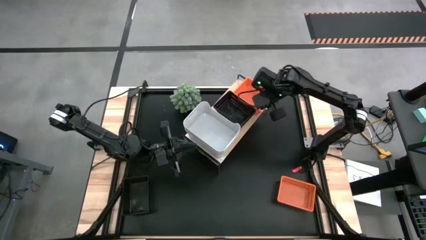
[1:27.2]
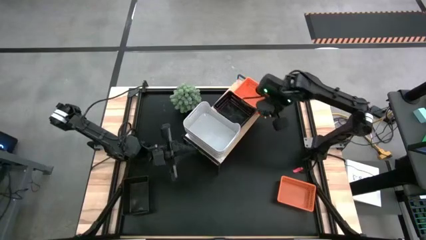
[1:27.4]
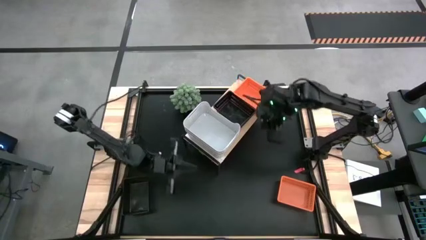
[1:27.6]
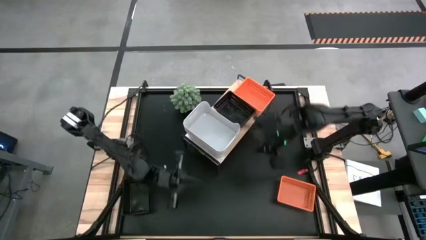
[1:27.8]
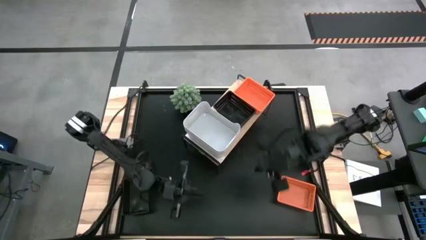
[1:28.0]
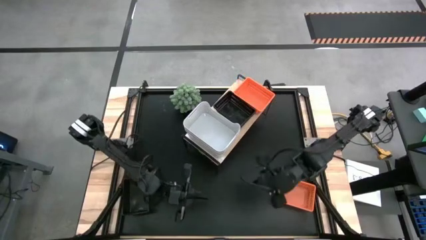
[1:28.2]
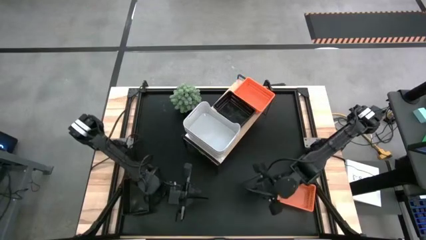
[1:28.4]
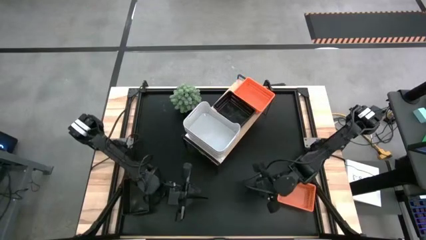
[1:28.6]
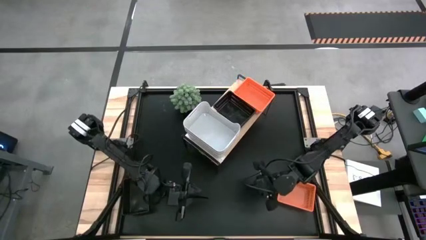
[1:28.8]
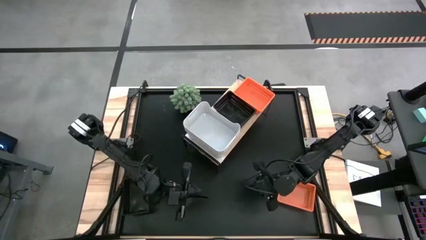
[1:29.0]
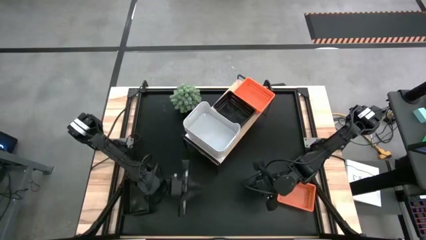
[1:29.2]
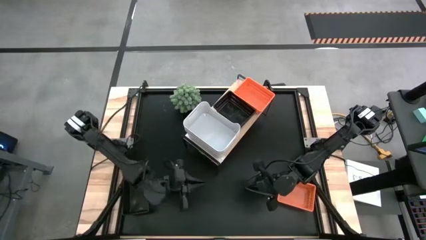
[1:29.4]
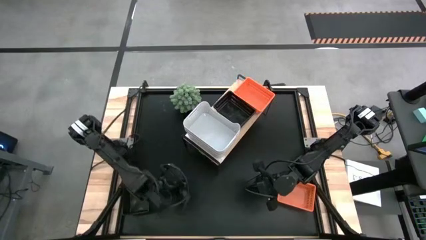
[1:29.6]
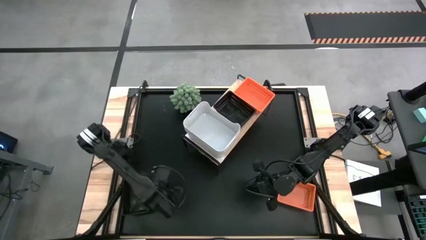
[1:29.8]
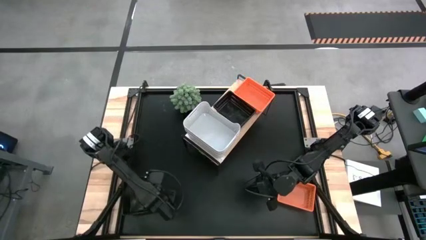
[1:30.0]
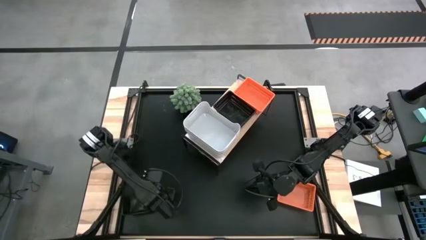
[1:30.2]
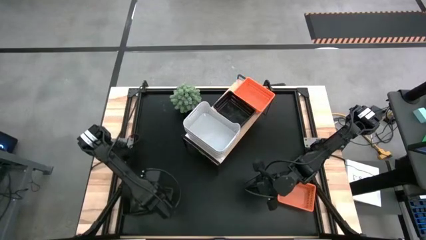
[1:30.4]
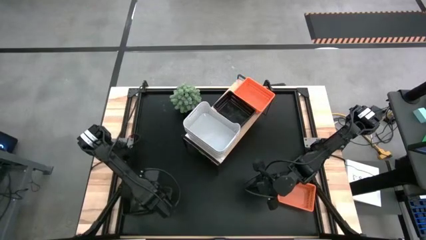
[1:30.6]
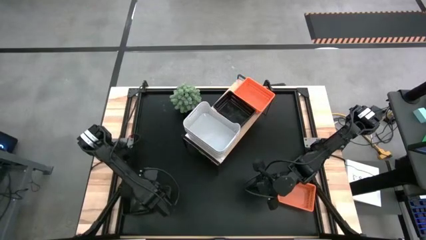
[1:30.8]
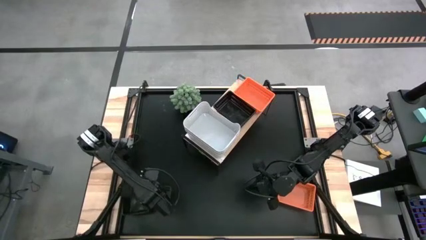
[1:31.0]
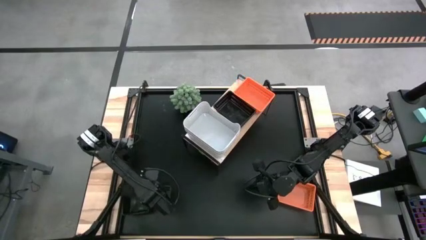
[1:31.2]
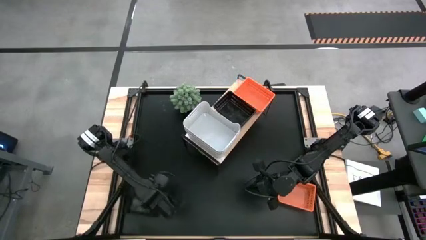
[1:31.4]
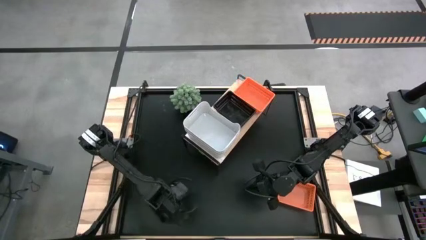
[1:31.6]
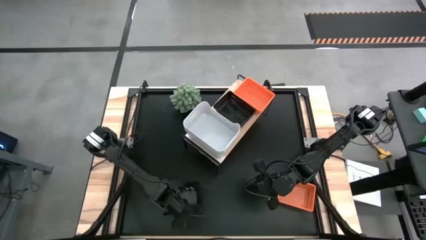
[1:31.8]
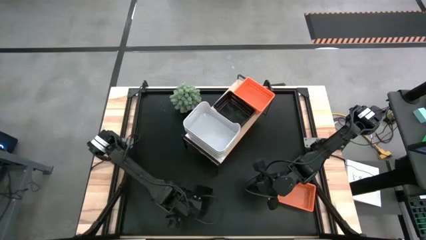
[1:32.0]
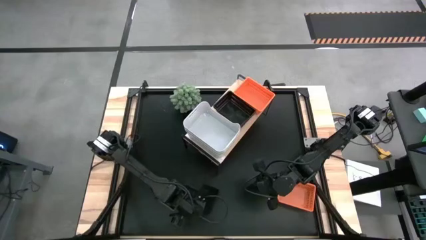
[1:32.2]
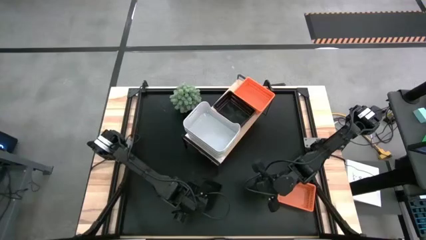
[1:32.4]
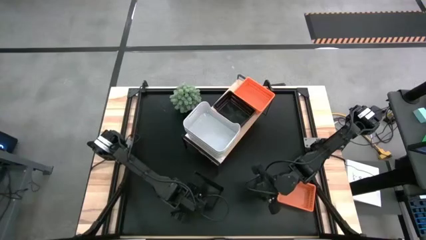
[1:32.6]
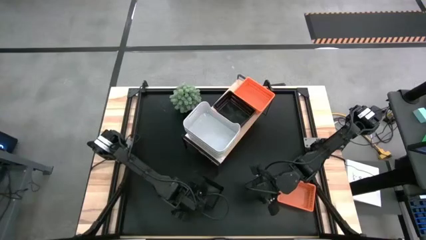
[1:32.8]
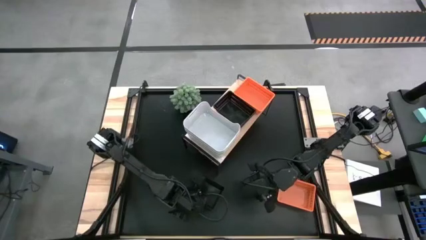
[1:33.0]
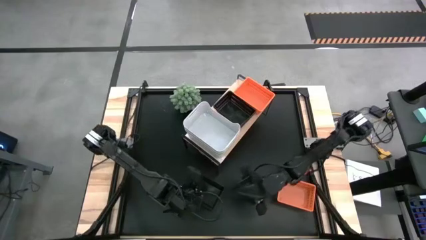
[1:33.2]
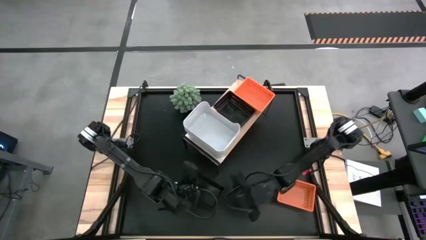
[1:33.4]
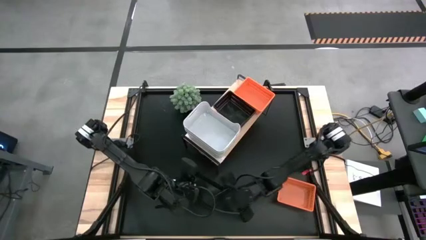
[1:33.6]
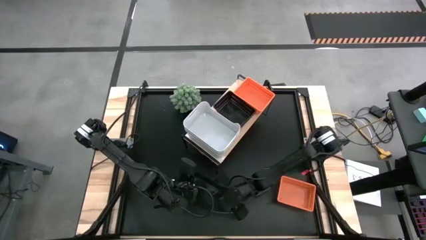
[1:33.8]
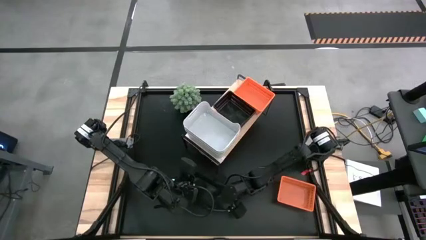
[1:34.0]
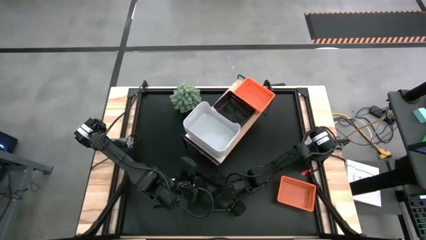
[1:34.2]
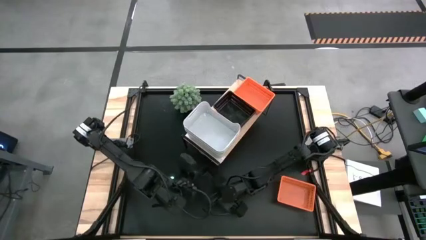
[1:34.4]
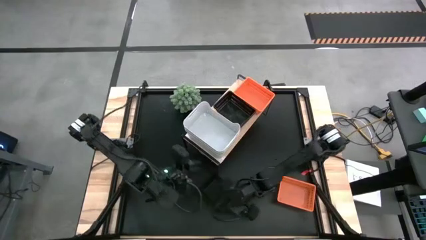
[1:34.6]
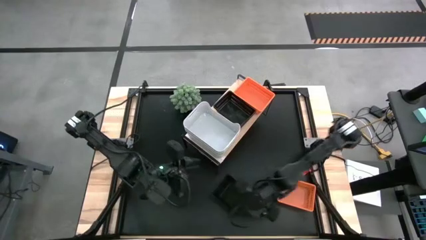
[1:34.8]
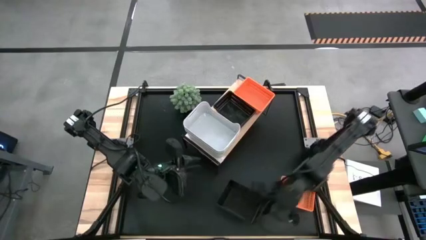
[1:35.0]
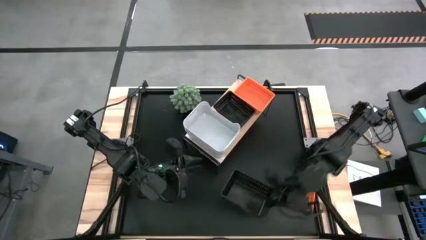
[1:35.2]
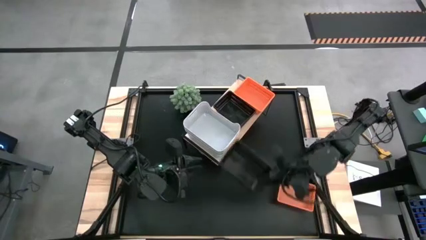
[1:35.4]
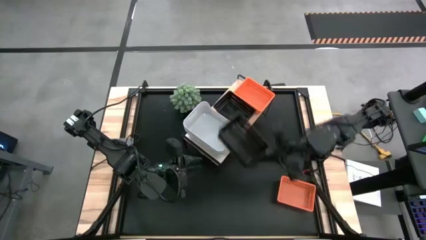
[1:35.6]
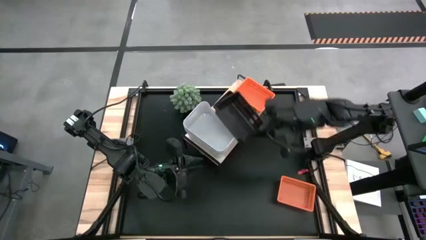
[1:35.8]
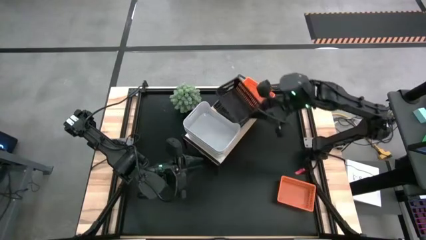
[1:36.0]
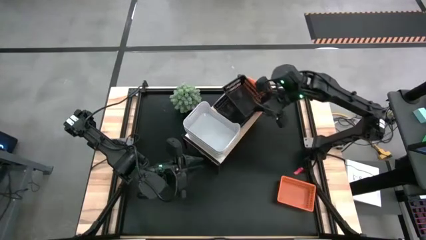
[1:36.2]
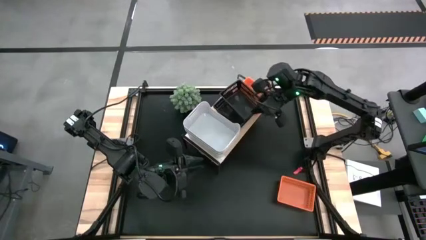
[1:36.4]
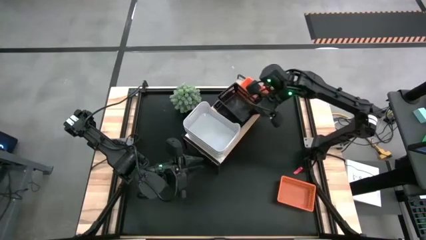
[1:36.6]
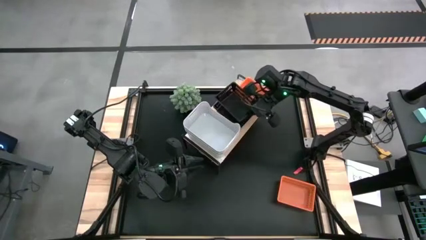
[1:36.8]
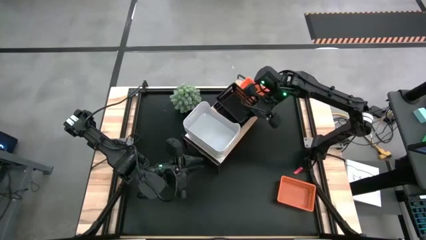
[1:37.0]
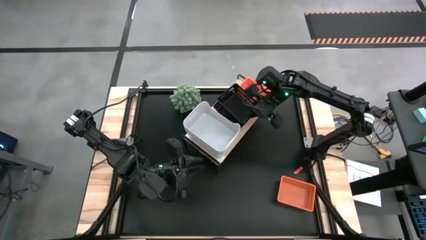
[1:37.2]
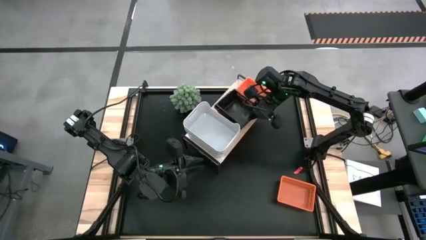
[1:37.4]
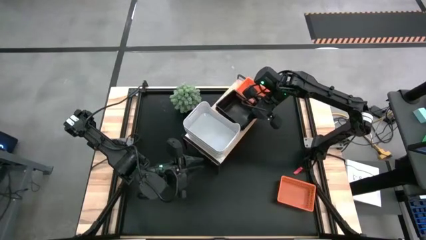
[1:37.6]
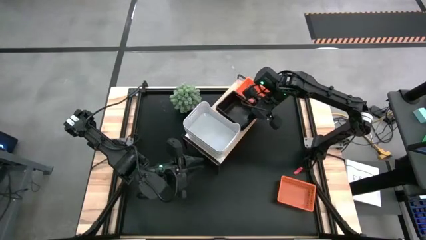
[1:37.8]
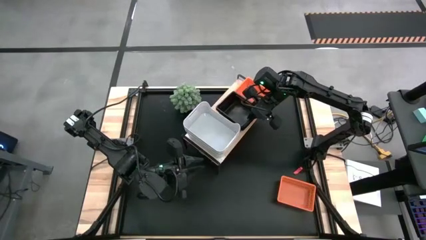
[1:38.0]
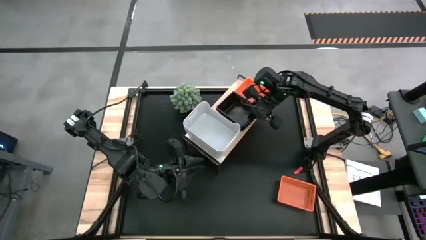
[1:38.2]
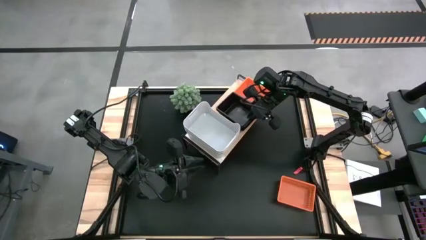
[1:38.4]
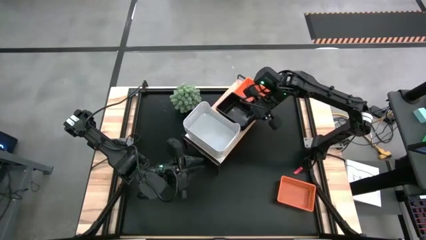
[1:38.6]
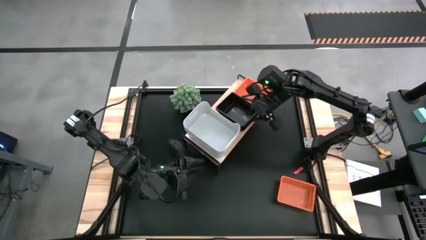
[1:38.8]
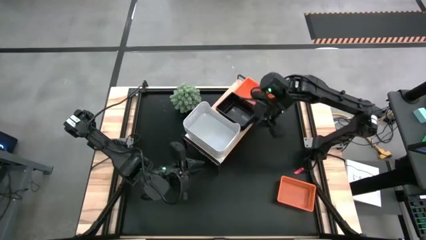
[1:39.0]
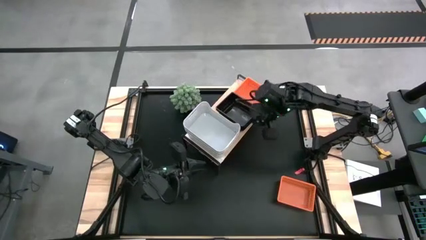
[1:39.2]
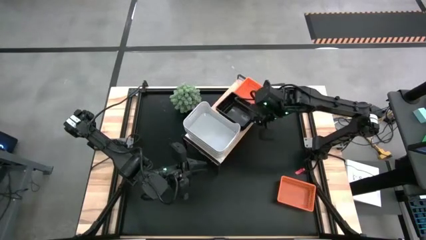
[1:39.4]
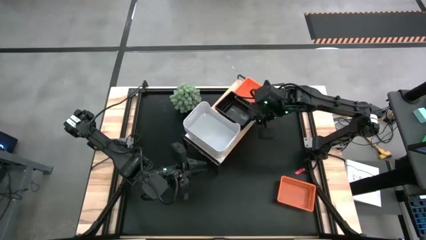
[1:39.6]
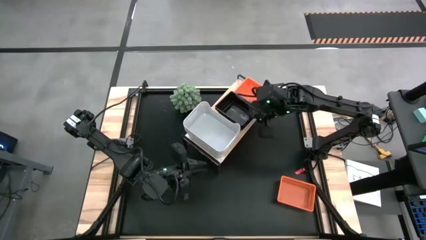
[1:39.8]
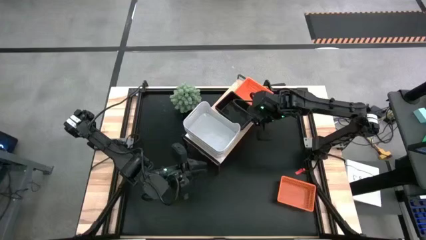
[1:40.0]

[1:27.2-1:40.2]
Task: Stack baskets on shelf by color
Stack the black bin on top of the other black bin on the shelf
